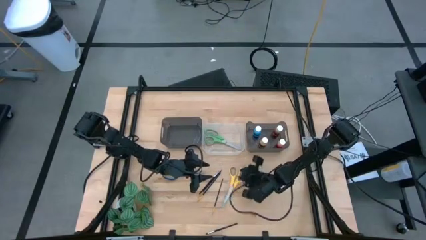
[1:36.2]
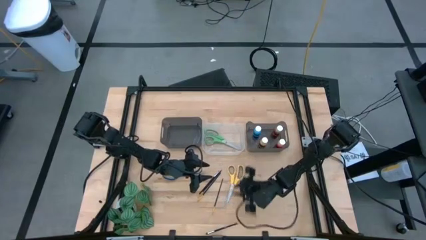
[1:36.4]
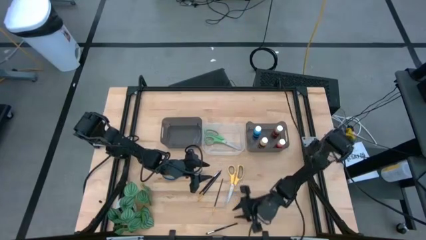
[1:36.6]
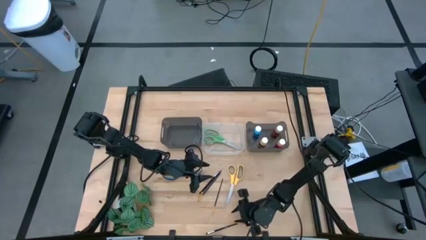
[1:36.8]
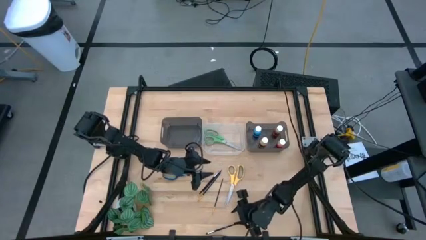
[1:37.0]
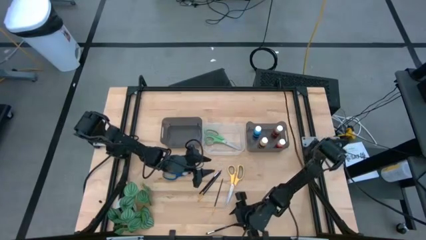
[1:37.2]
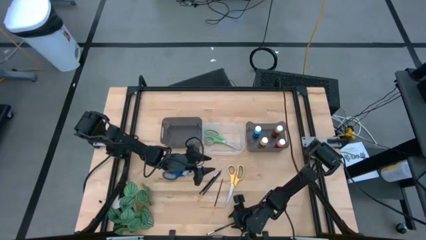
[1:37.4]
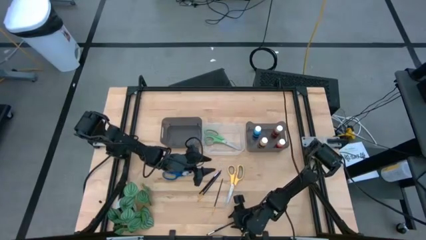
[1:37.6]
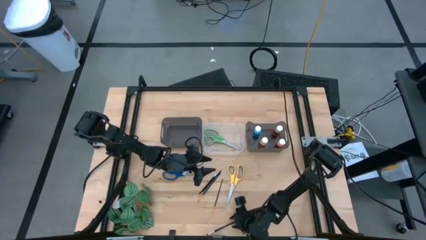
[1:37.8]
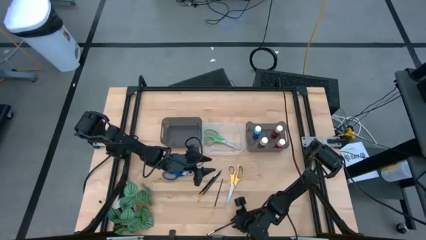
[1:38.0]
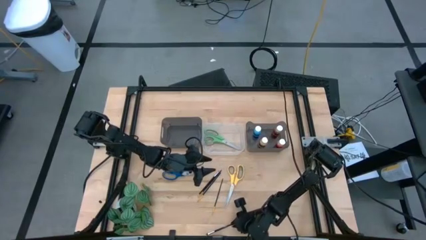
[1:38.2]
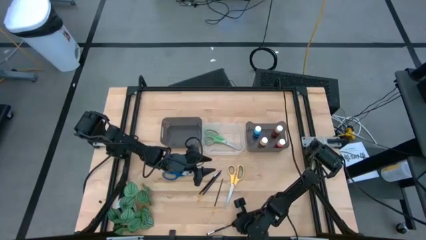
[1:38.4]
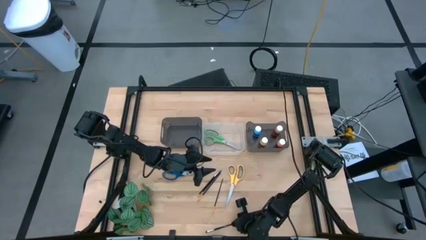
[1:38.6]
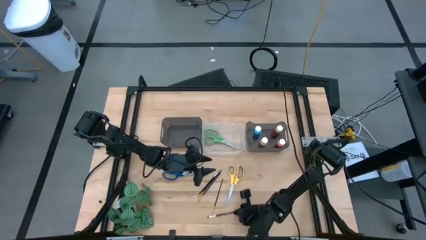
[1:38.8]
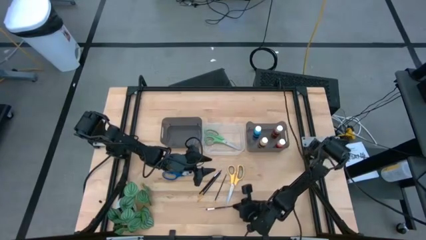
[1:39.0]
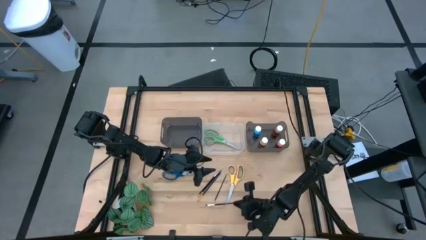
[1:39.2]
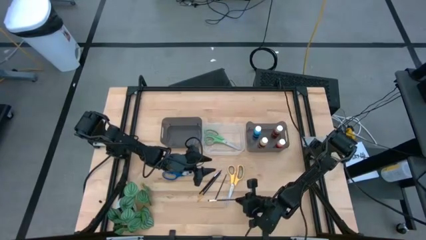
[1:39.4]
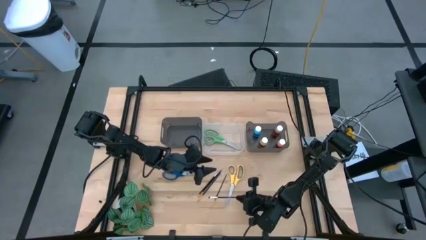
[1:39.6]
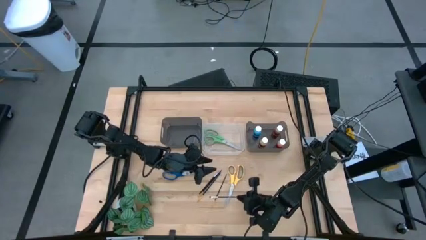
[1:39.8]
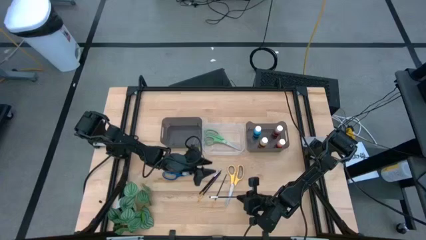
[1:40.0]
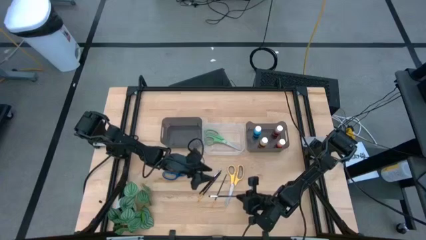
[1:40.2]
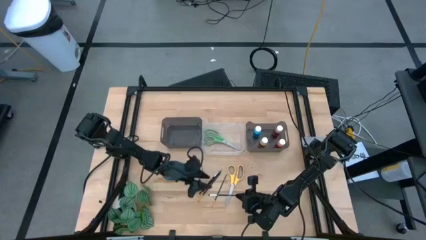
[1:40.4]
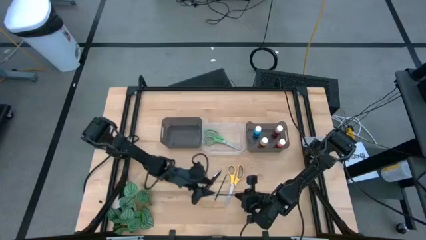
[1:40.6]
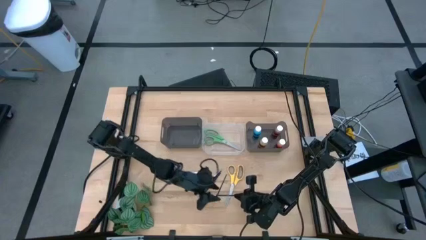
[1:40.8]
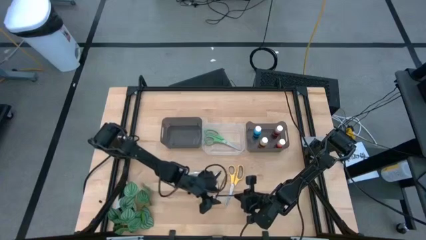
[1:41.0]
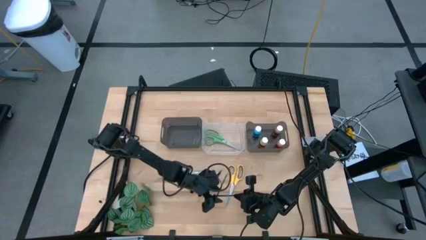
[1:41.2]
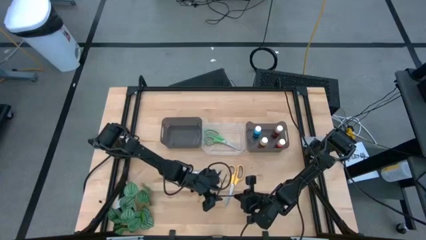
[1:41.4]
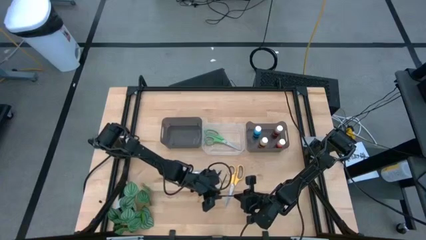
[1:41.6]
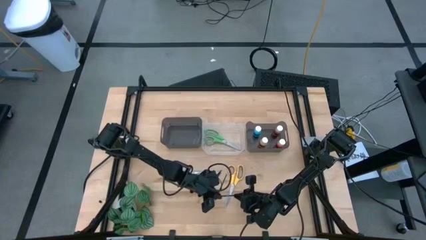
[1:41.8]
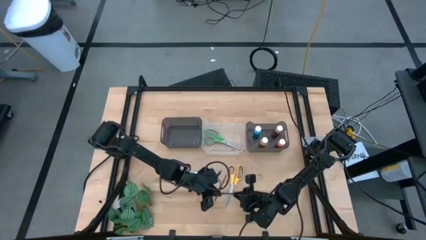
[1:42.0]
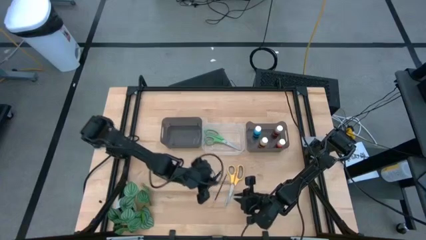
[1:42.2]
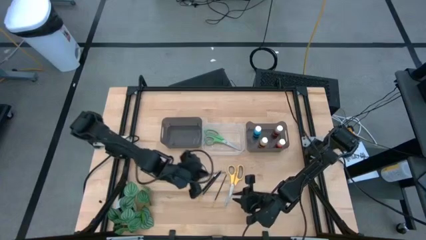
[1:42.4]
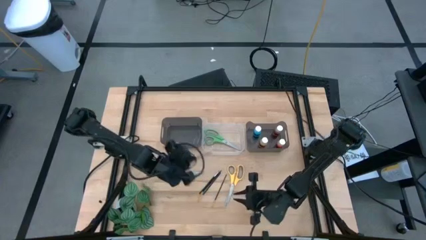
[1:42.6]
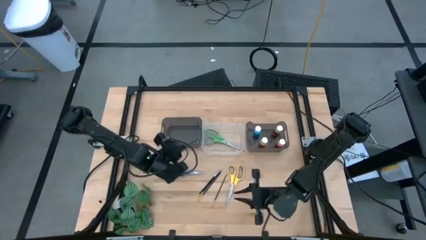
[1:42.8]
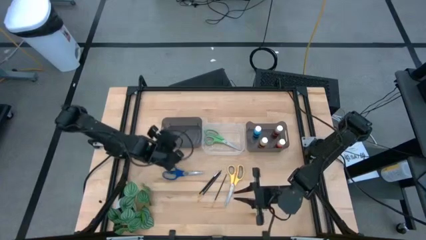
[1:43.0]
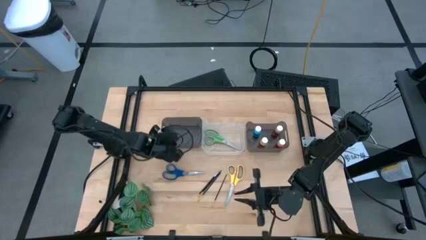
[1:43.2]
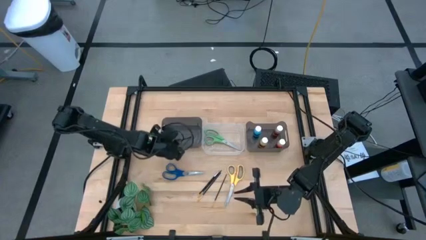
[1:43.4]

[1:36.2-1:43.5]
Task: Pick & Place Paint Supplies
Put the bottom silver paint brush into the left black bin

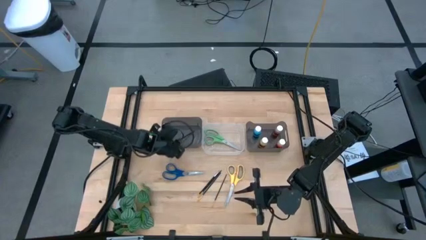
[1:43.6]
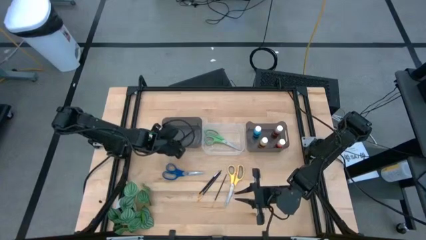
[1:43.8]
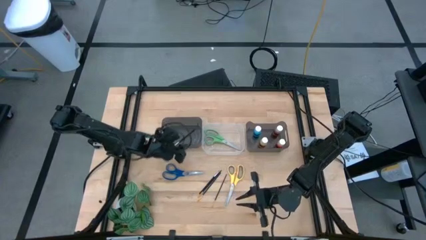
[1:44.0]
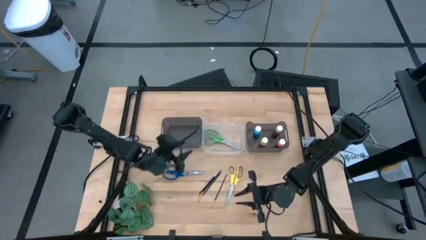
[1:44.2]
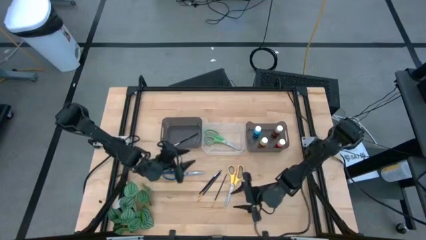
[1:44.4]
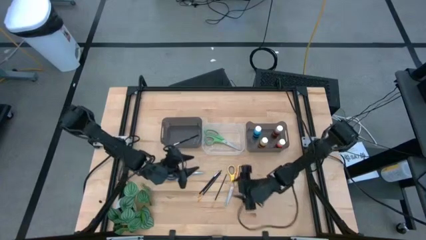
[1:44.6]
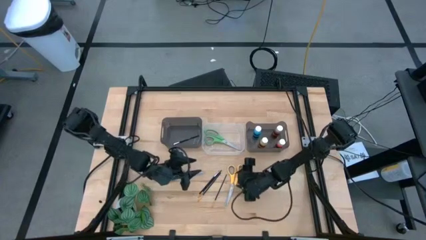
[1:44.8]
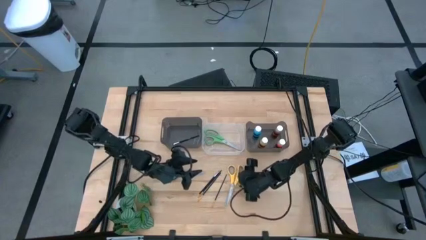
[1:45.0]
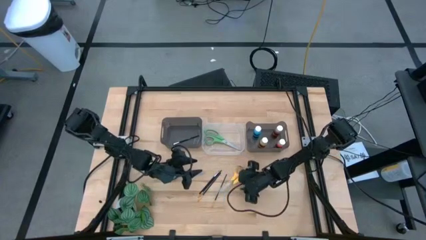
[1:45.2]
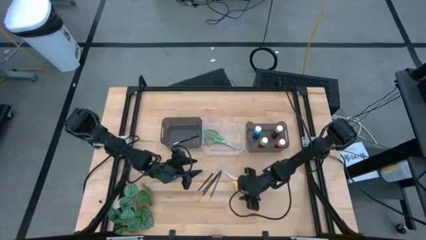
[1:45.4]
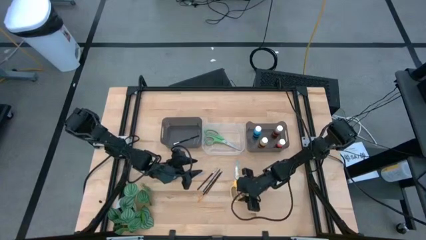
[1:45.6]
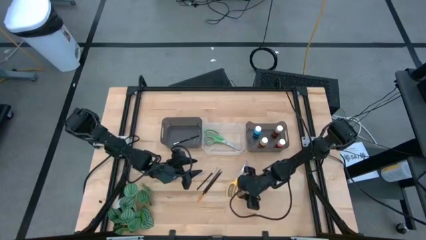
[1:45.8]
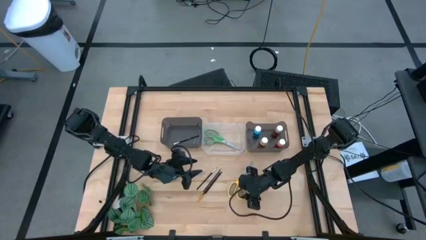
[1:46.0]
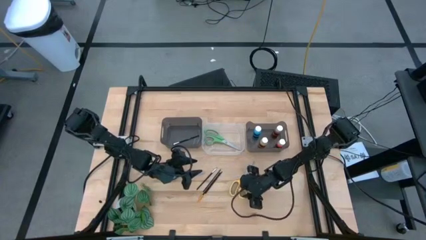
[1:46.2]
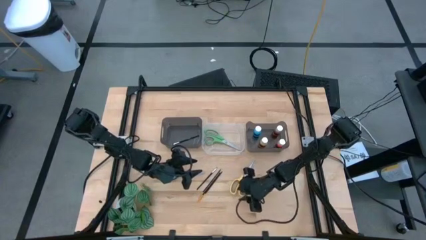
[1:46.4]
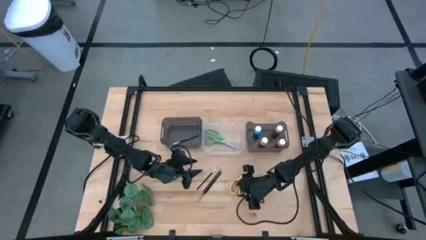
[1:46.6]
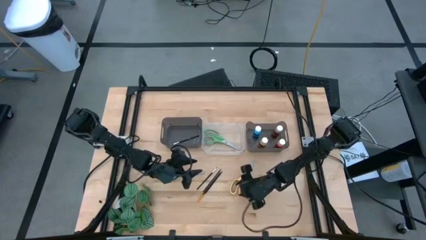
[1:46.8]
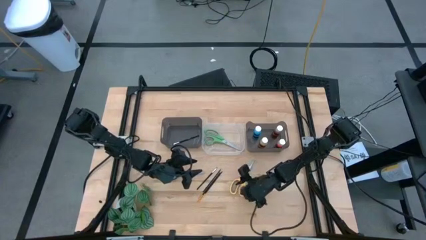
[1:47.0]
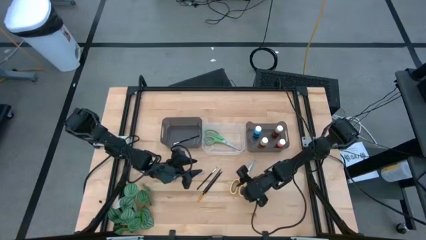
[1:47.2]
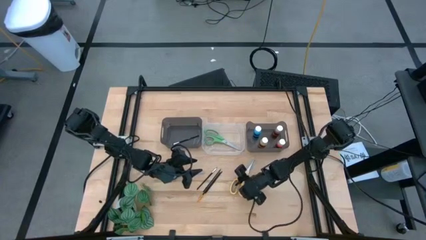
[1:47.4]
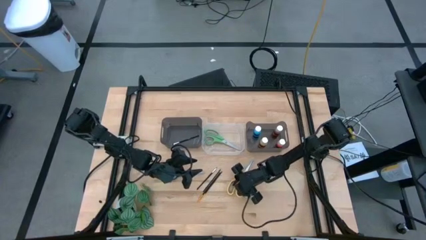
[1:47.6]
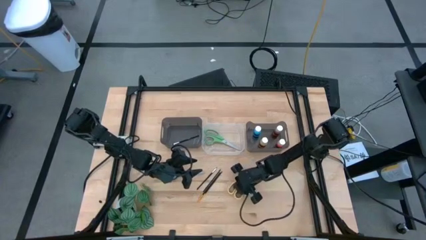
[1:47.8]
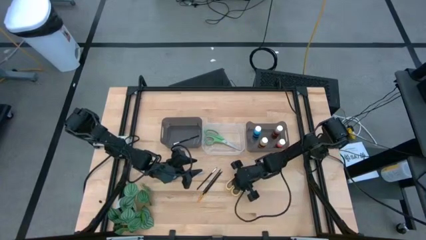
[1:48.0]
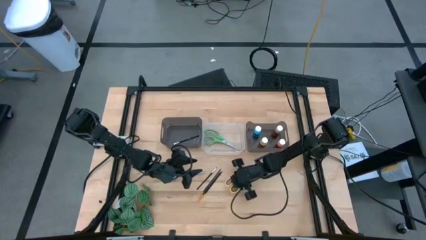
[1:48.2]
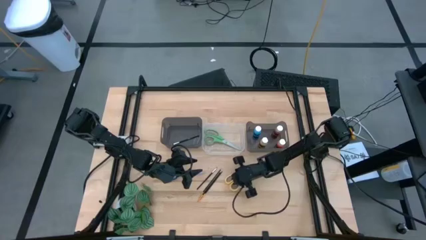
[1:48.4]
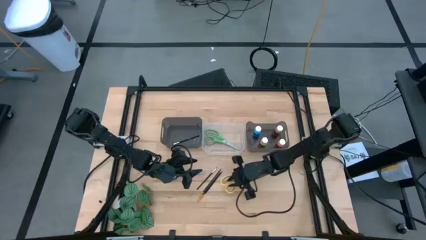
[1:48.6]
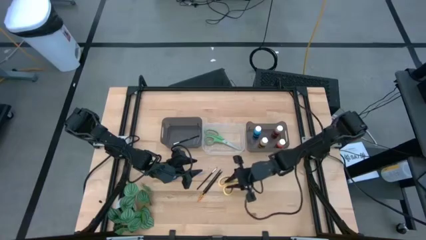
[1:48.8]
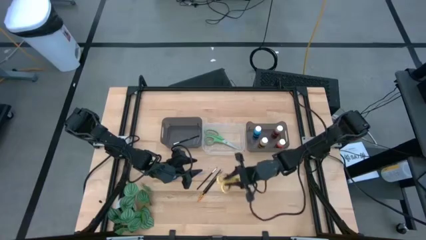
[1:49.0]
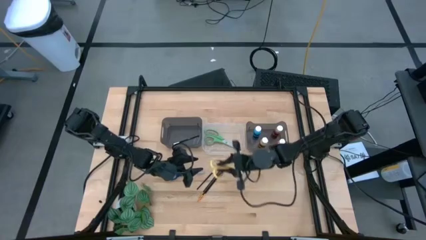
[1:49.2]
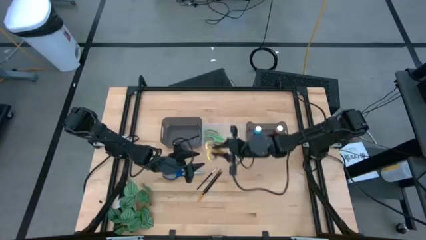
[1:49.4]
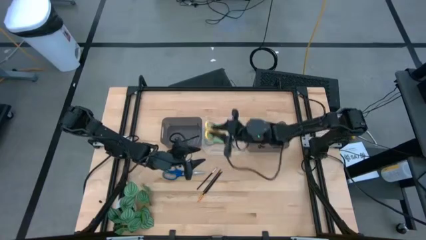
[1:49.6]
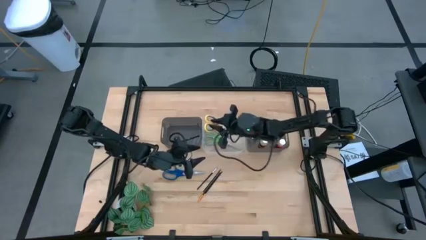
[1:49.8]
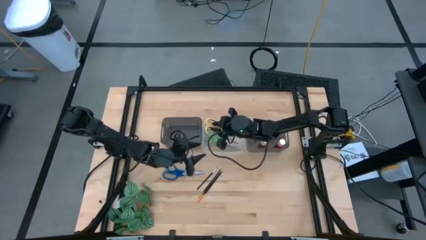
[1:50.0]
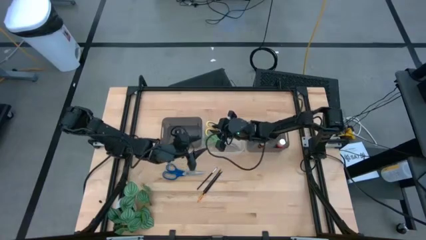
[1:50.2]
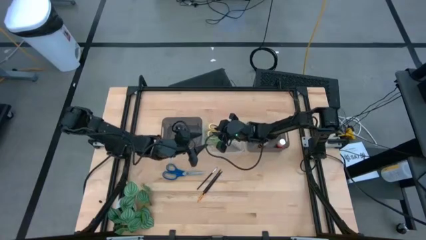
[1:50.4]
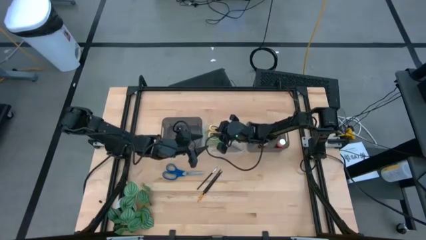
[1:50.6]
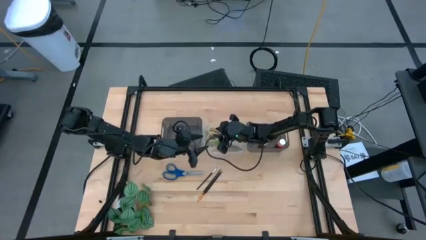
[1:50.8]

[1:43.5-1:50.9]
Put the yellow scissors into the transparent bin

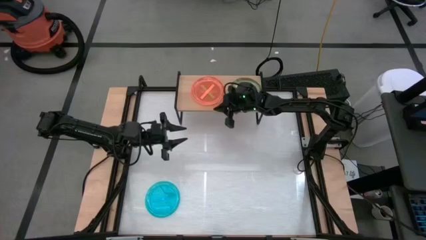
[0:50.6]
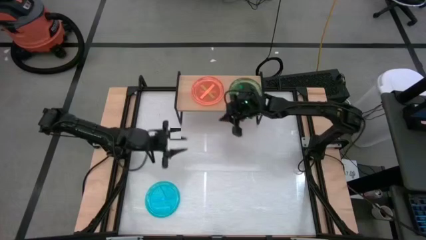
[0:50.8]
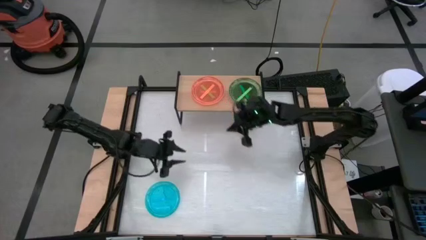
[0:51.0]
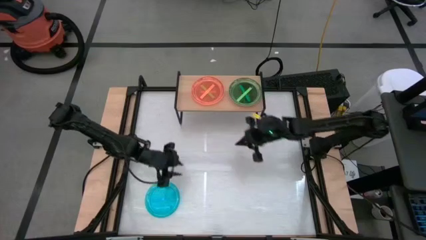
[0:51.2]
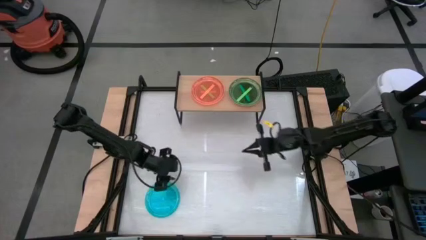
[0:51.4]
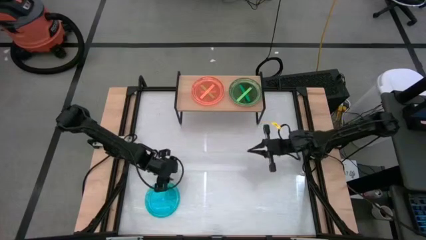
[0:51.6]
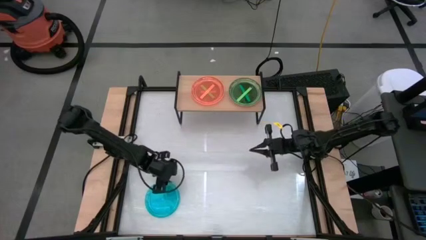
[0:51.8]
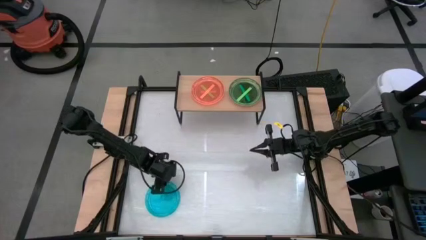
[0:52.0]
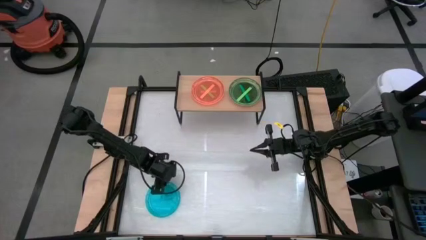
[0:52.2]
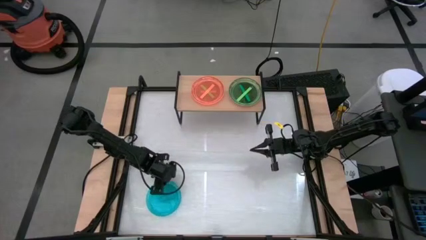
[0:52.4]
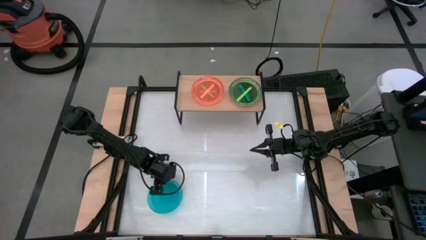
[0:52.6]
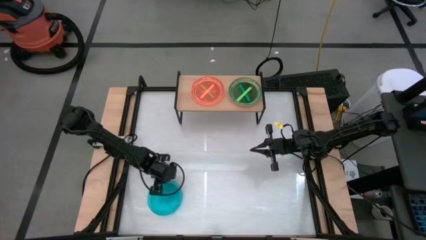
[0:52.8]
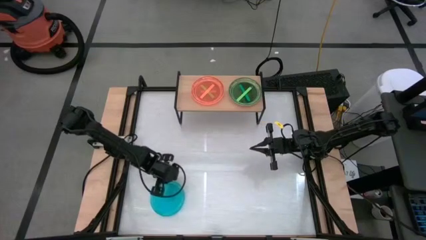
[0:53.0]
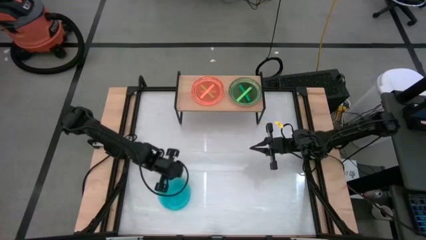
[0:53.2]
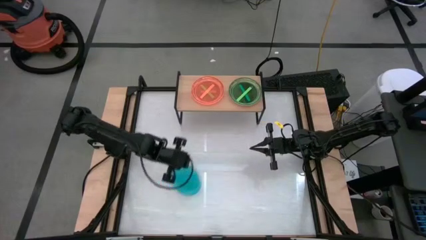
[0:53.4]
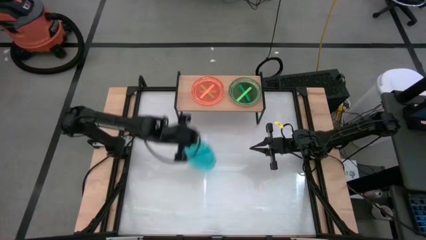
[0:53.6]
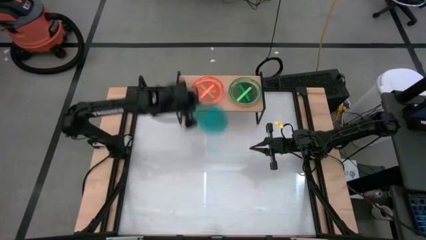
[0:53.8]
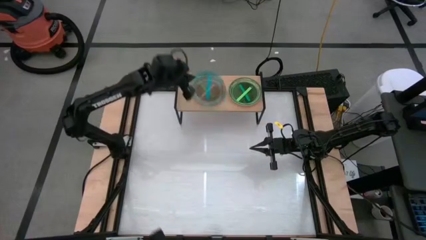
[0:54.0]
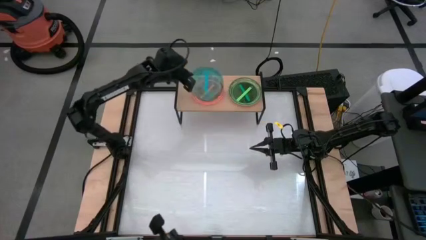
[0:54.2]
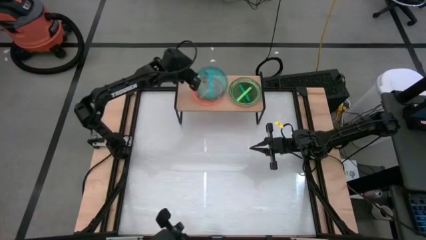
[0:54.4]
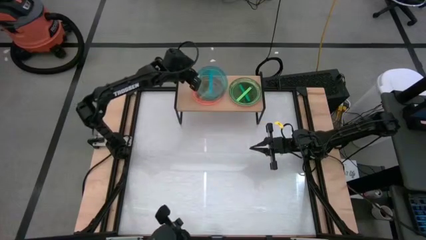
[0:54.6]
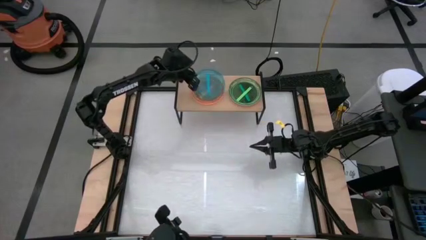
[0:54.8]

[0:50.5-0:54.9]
Task: Place and stack plates onto a shelf
Stack the blue plate on top of the orange plate on the shelf
